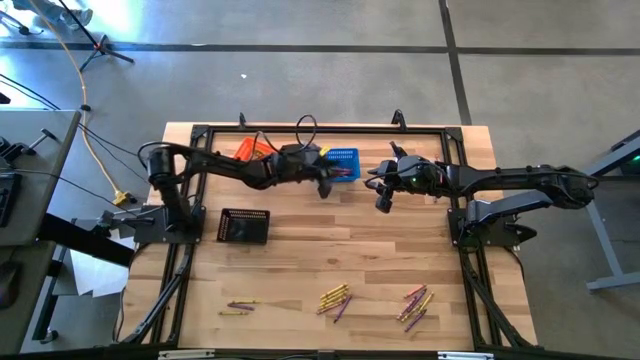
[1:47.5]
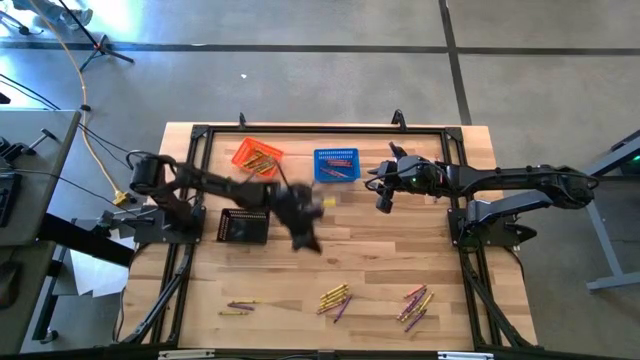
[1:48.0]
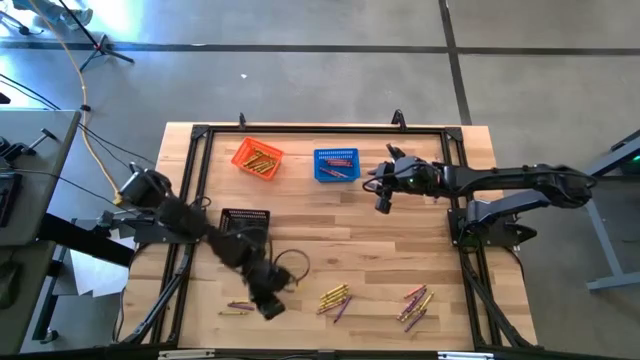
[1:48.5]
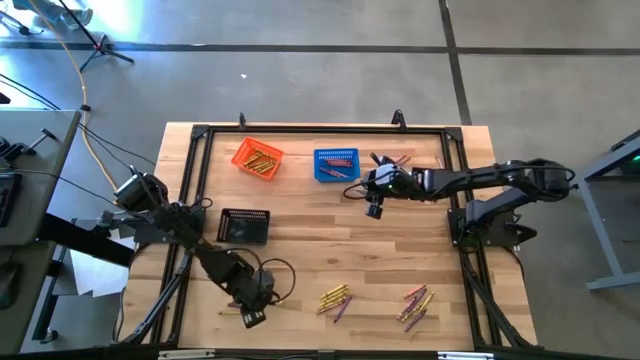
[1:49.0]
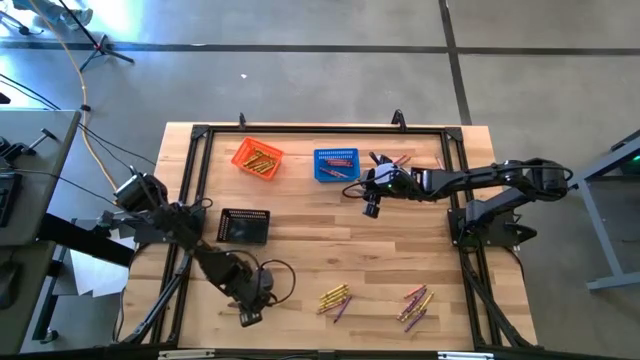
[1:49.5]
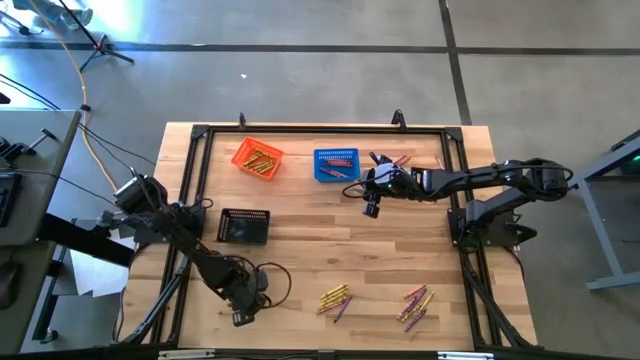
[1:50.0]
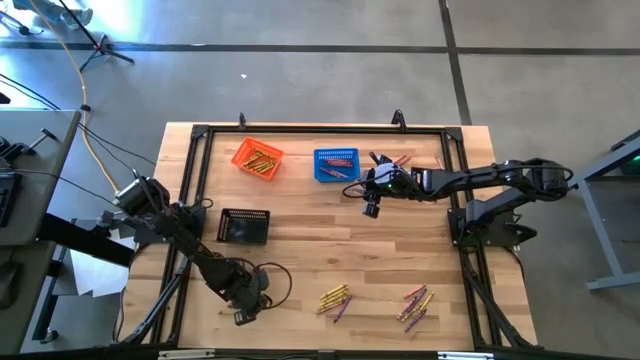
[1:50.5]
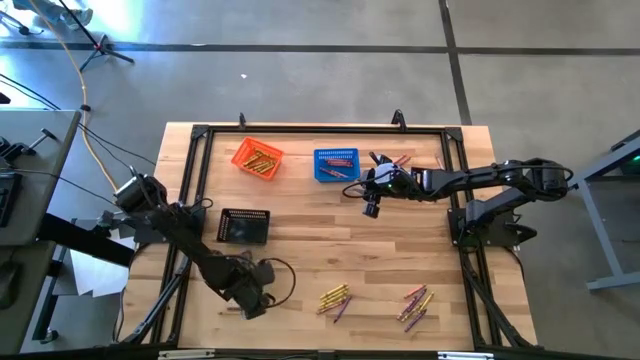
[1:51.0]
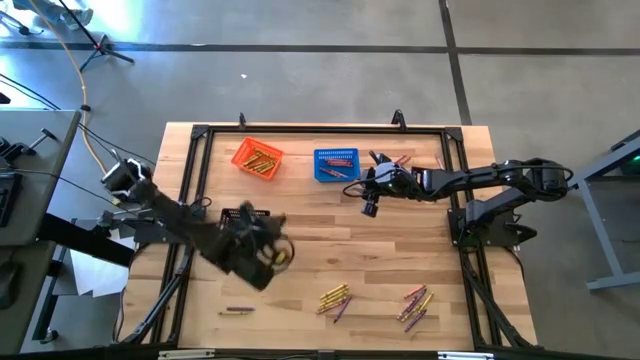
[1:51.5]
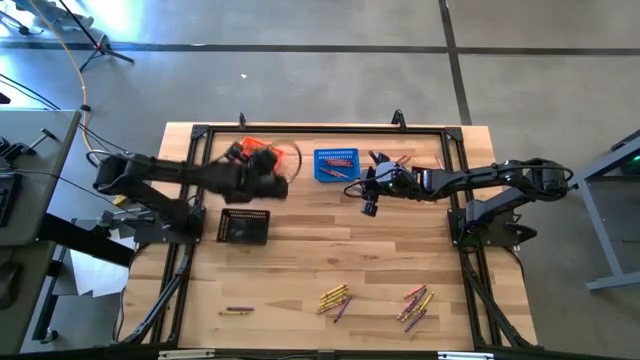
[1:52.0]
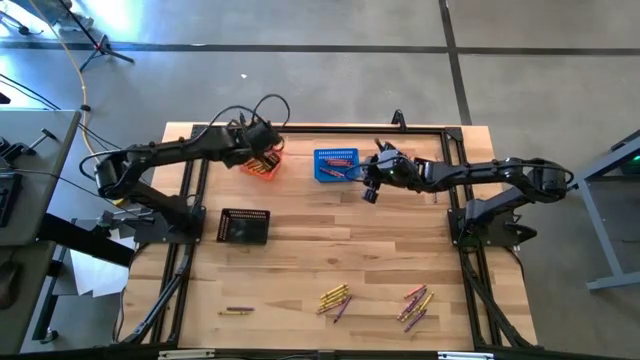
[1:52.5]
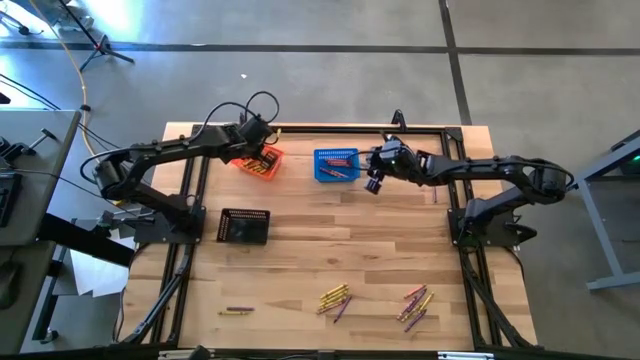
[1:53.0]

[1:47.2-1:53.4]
Task: Sort crayons
Put the yellow crayon into the orange bin

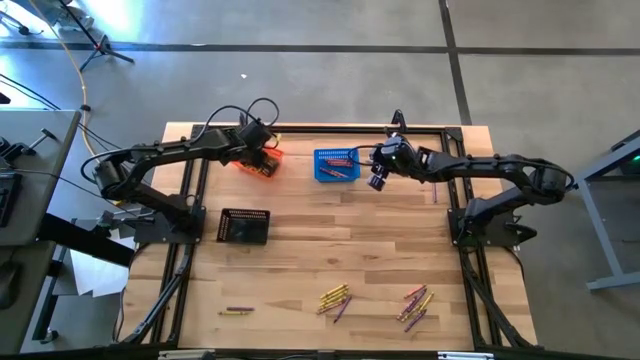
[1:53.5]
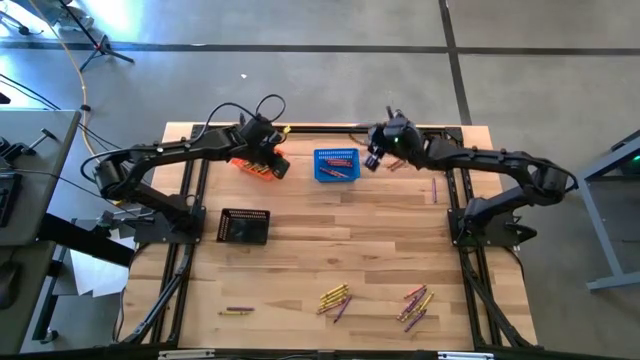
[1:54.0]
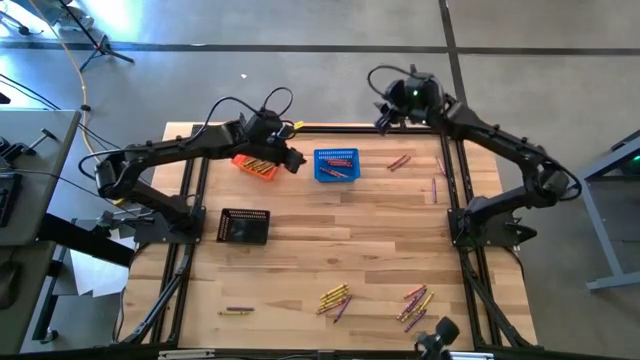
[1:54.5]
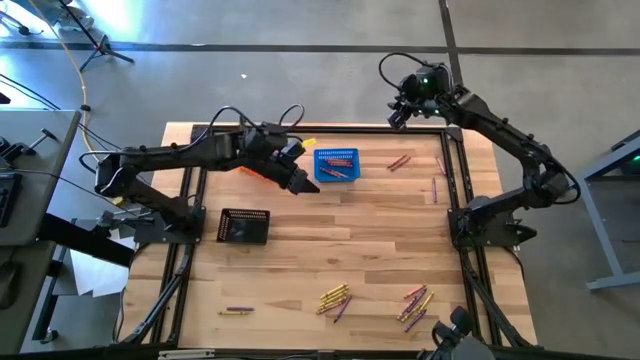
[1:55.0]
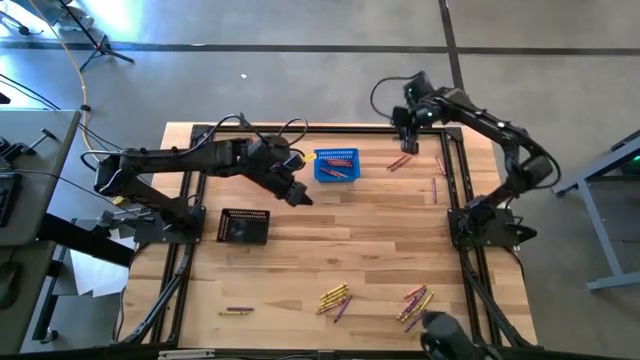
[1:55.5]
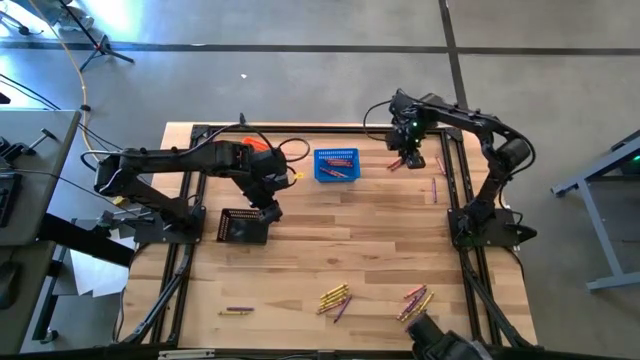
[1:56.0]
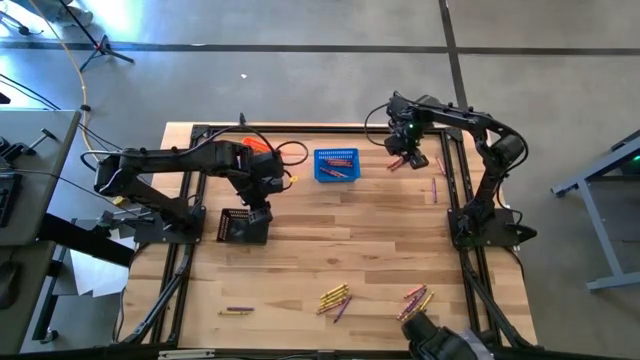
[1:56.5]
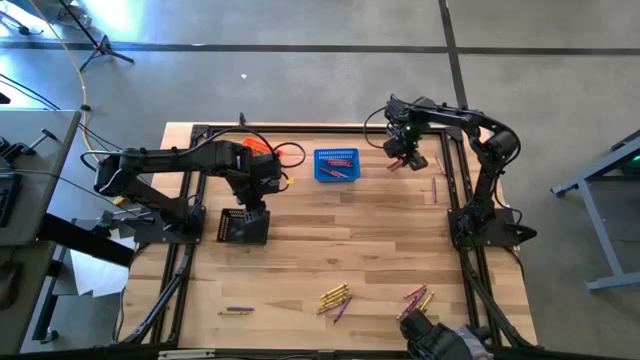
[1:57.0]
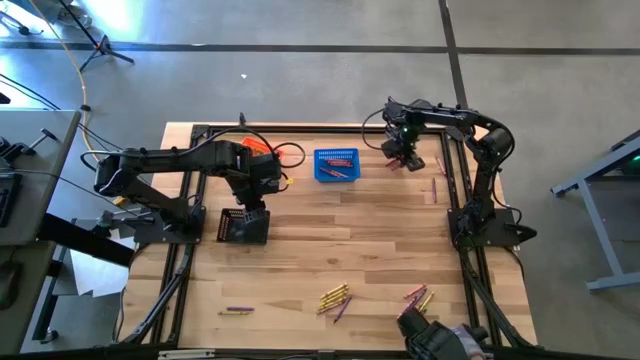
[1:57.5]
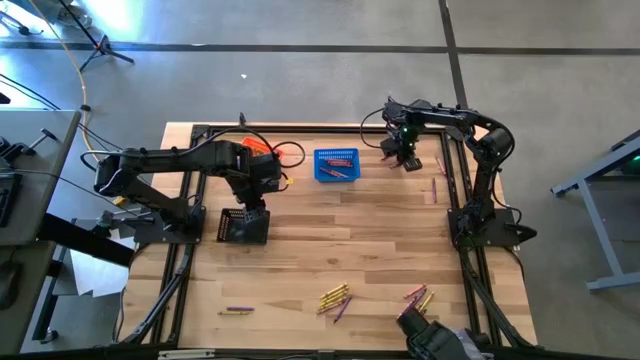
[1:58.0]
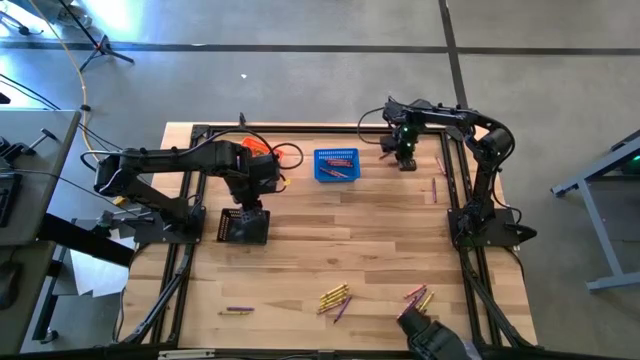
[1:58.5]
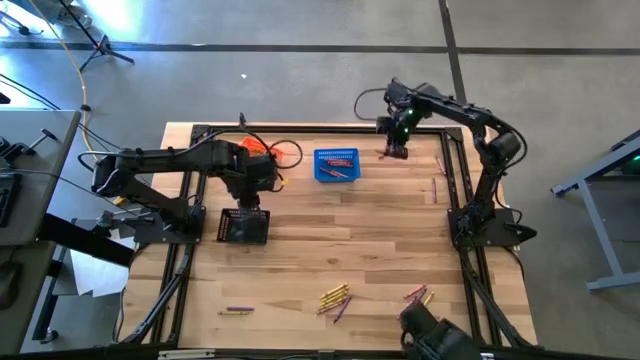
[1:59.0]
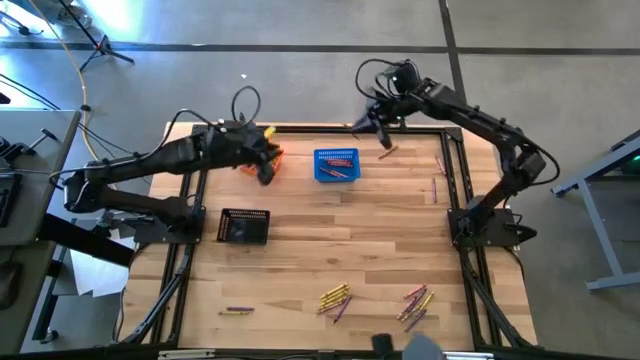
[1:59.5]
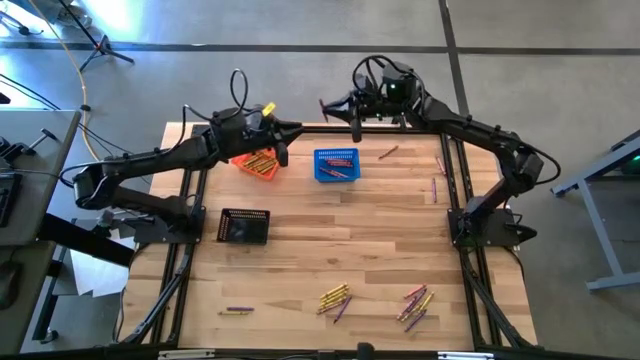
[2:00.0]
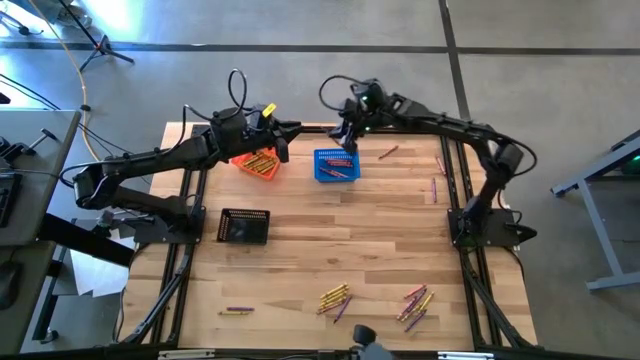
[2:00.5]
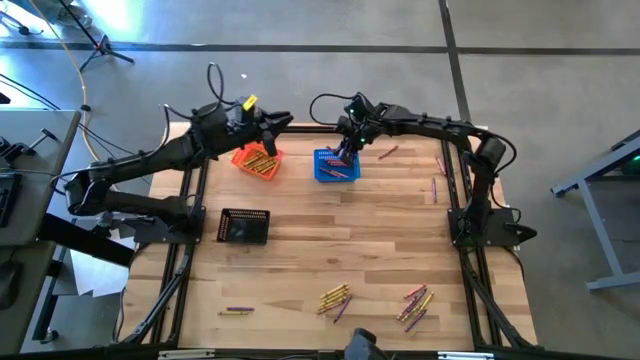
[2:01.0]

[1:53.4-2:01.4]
Put the red crayon into the blue bin

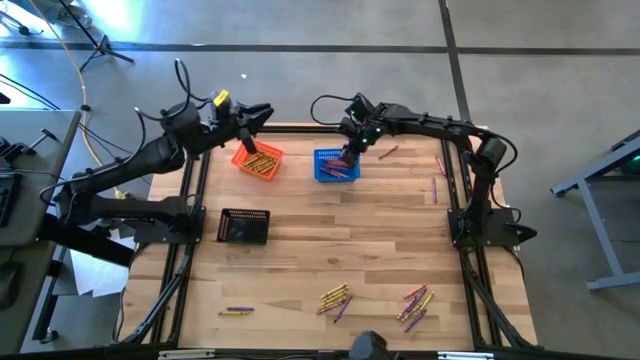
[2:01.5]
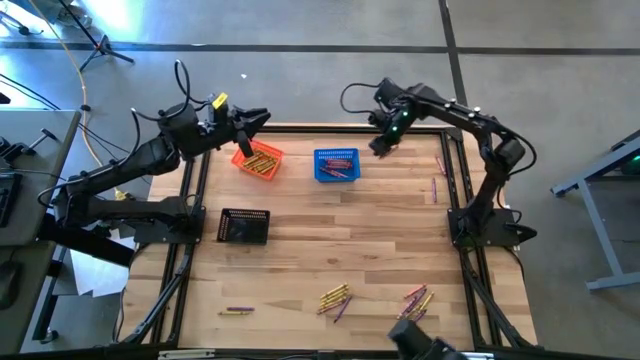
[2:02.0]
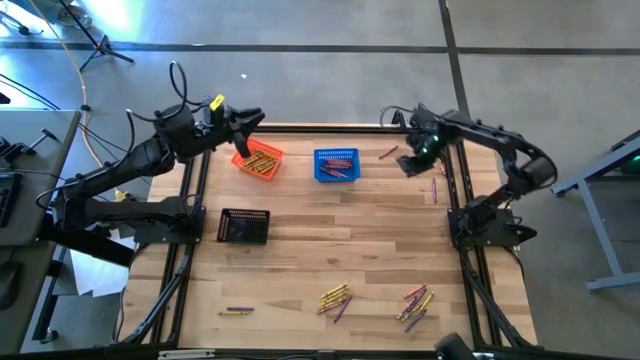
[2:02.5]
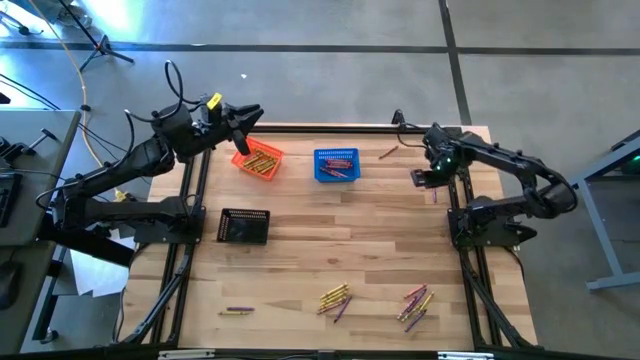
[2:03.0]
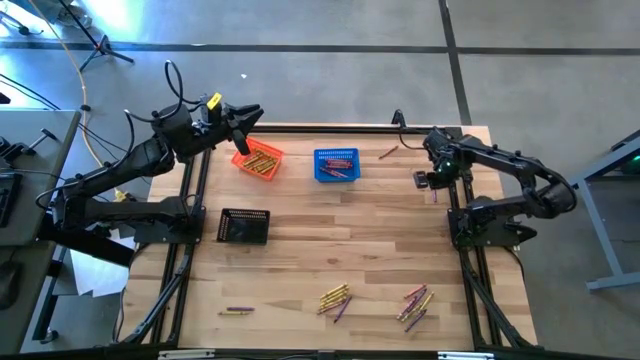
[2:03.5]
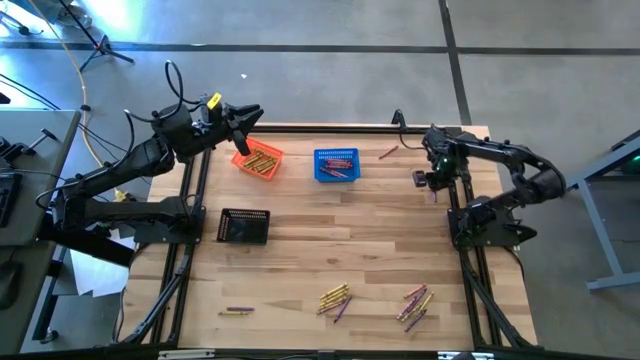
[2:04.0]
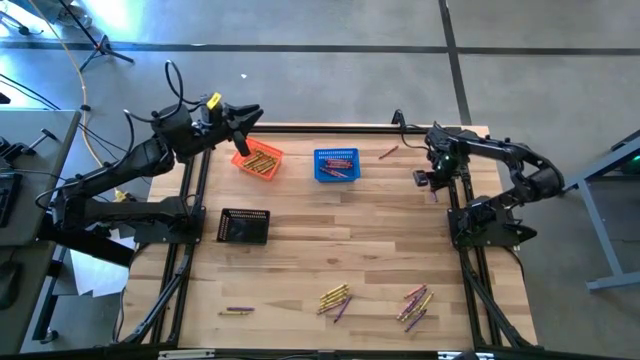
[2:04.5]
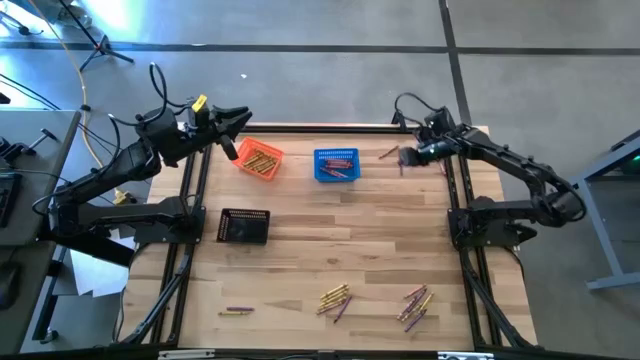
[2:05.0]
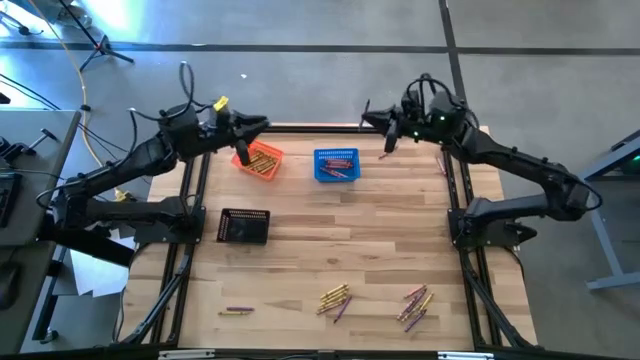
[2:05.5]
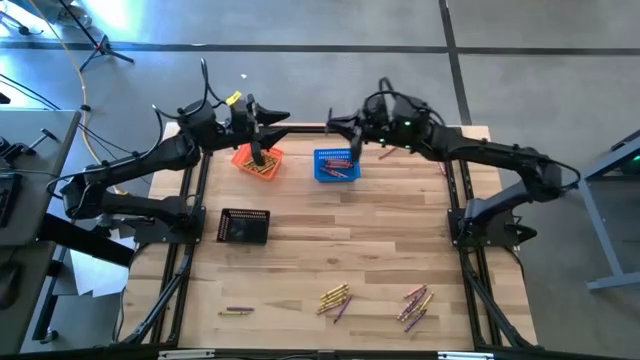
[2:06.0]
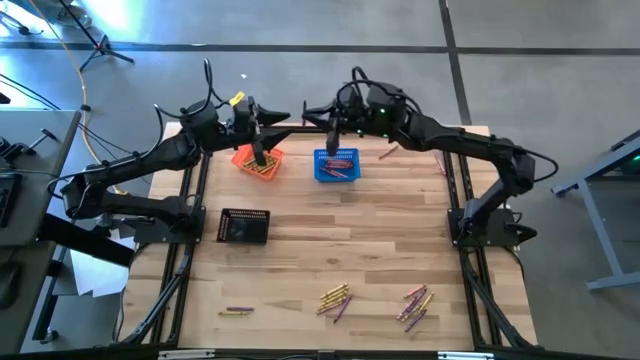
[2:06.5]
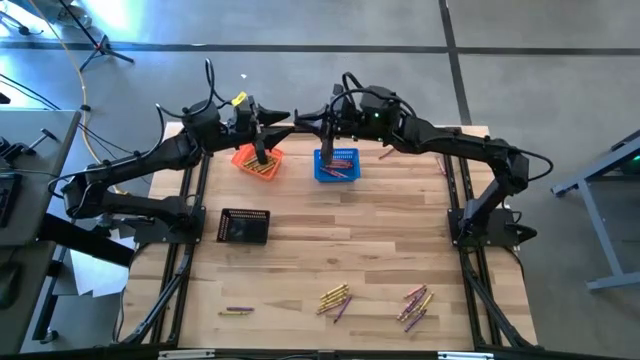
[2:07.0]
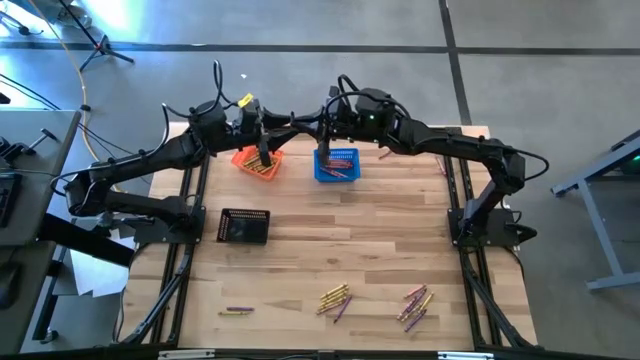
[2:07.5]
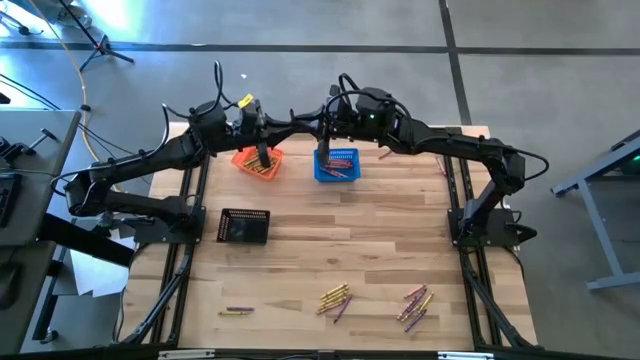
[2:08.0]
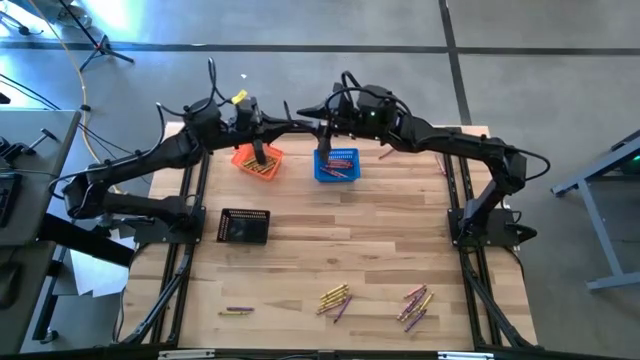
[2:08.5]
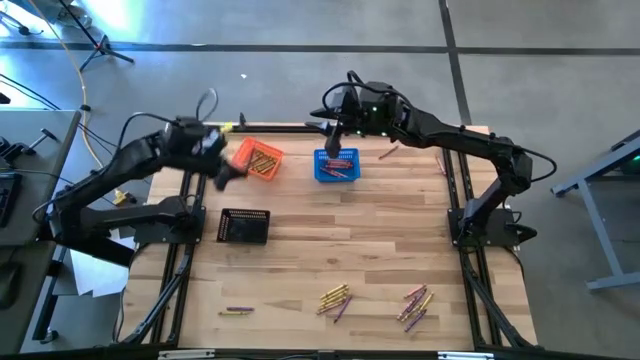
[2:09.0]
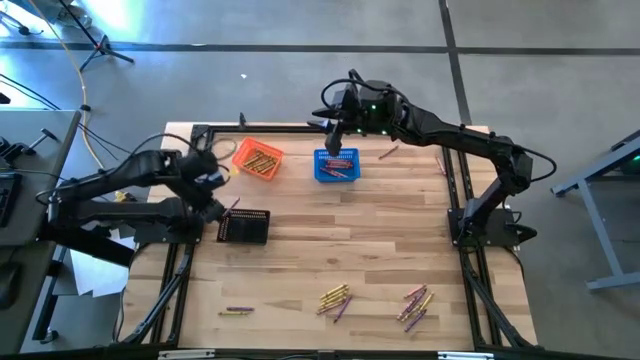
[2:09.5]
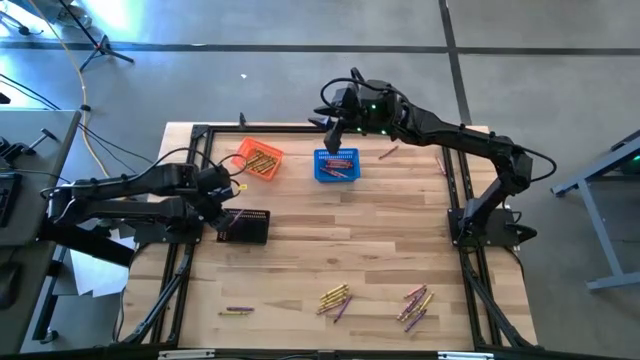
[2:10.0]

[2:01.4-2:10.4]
Put the violet crayon into the black bin
